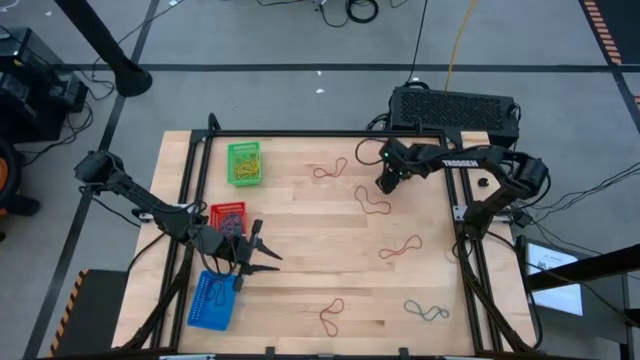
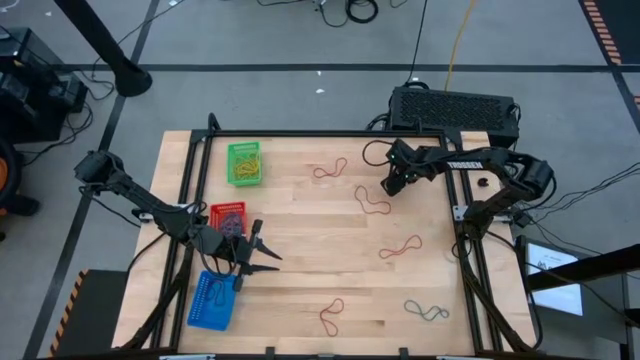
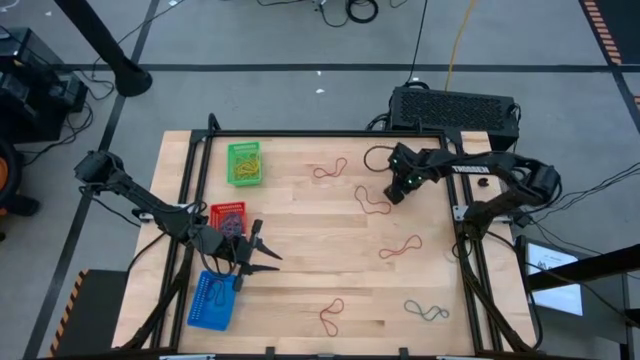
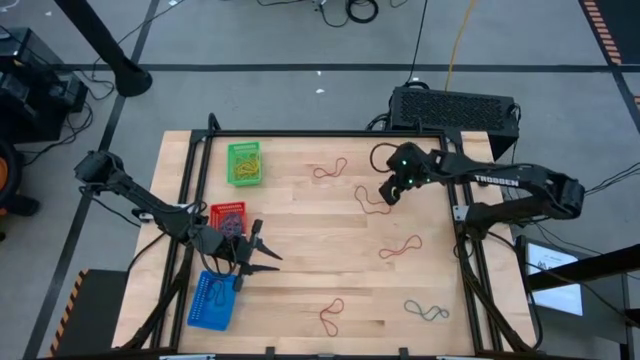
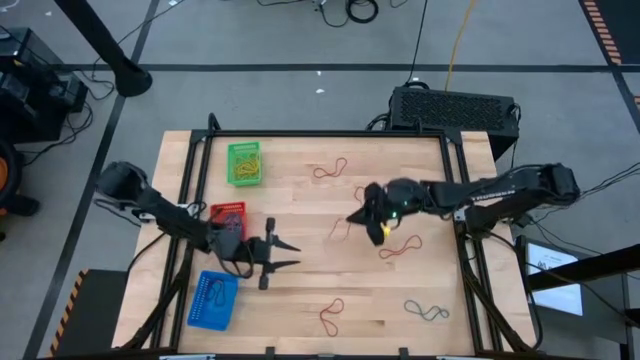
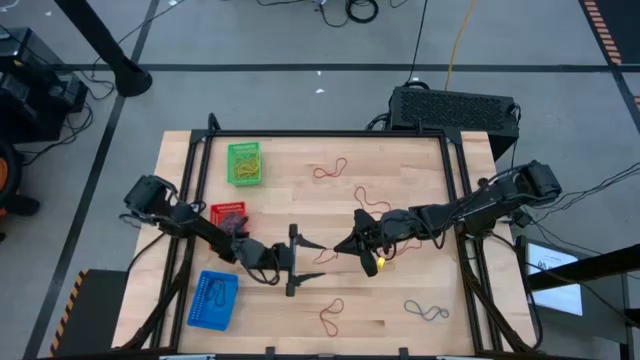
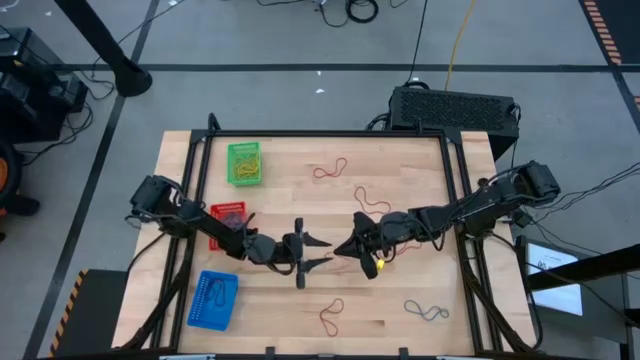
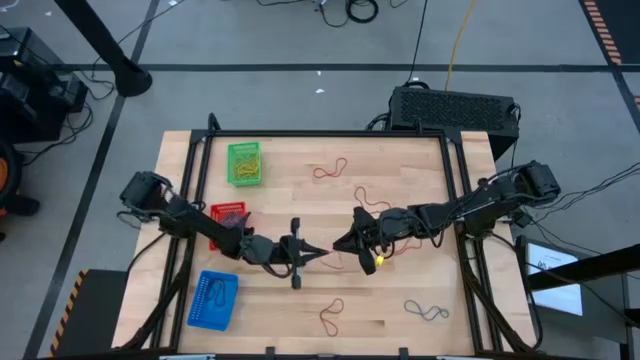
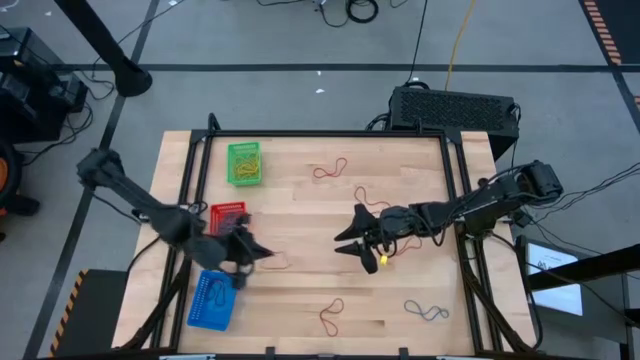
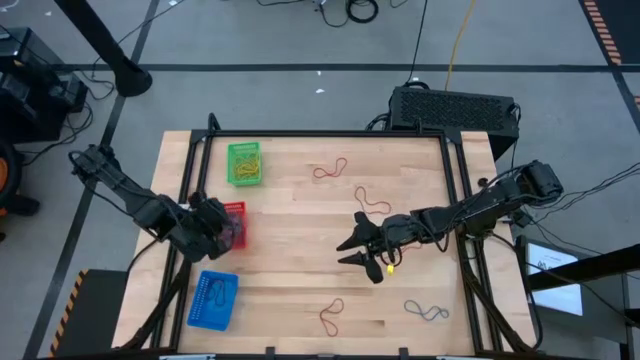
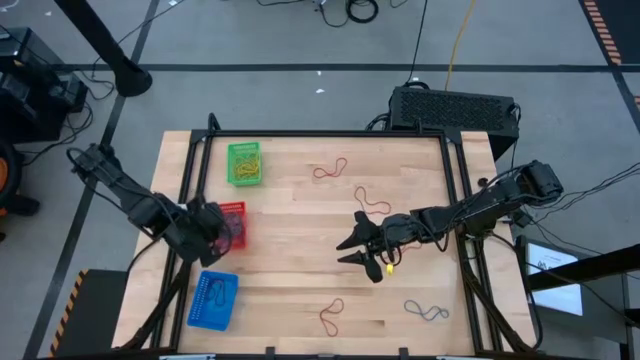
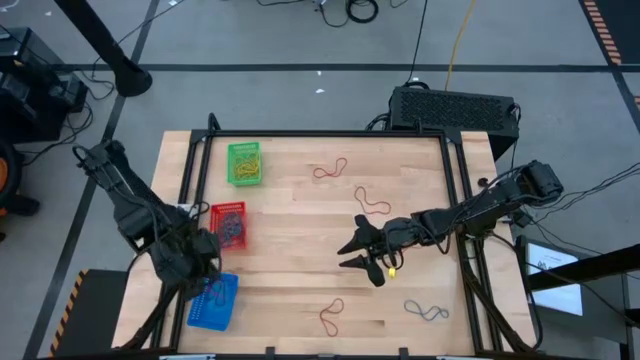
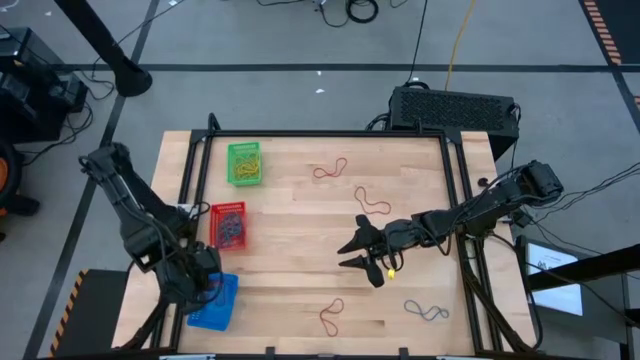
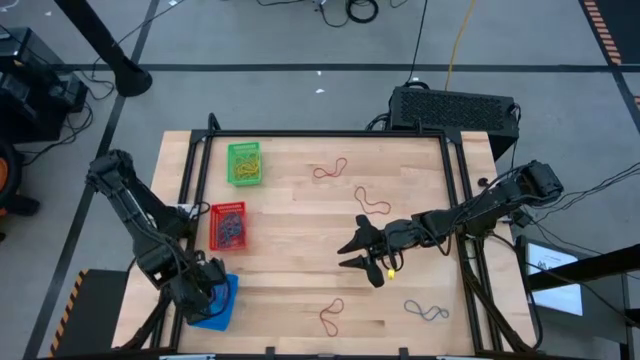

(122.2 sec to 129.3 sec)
Task: Sort rubber bands into baskets
Put the red rubber band into the blue bin

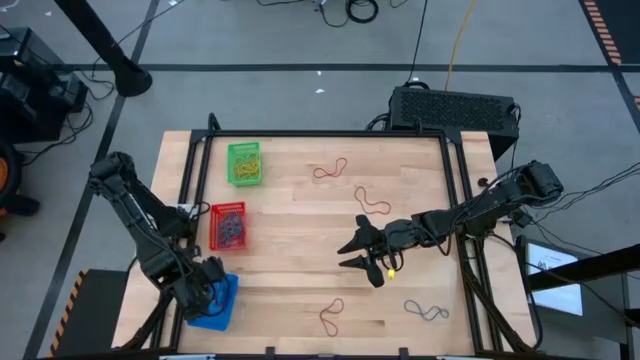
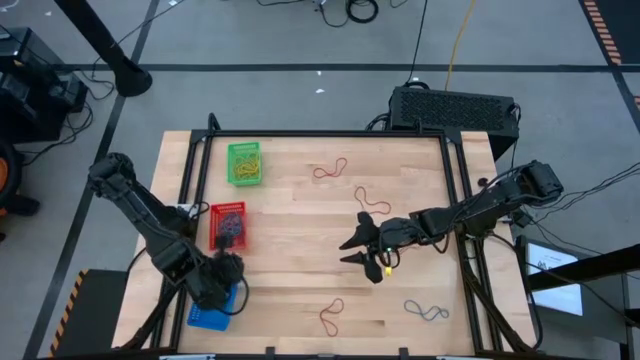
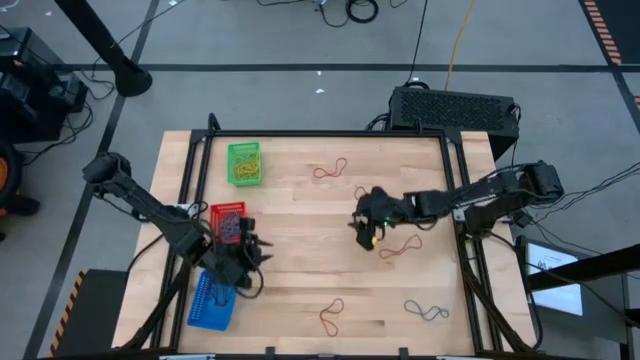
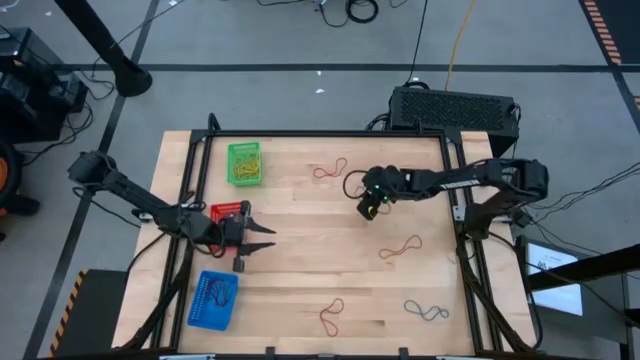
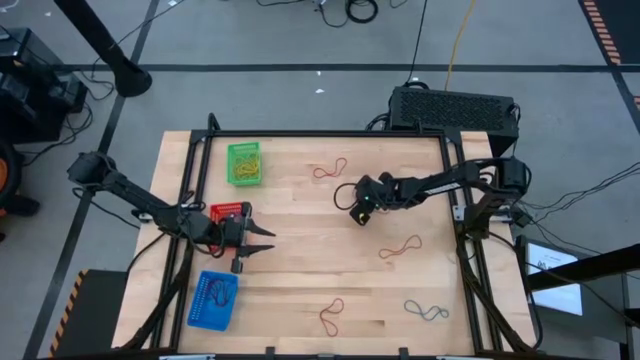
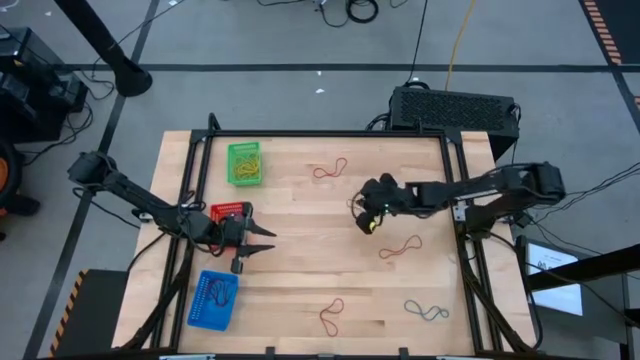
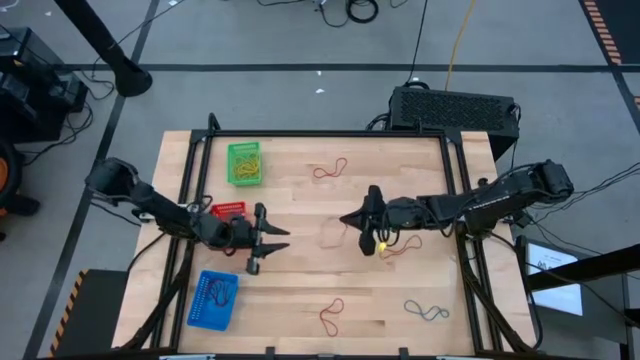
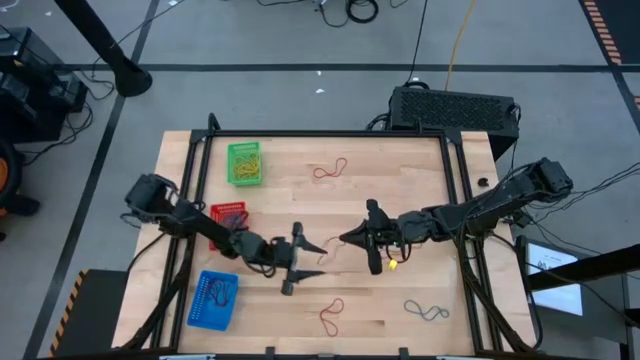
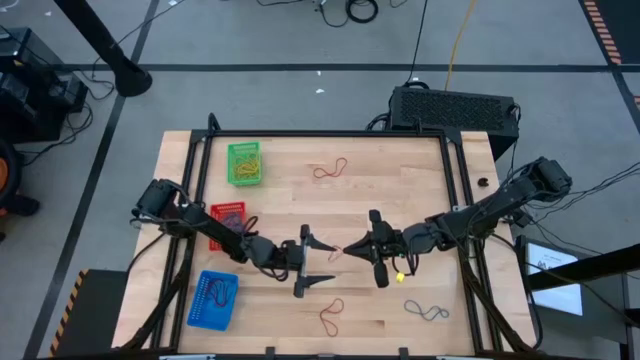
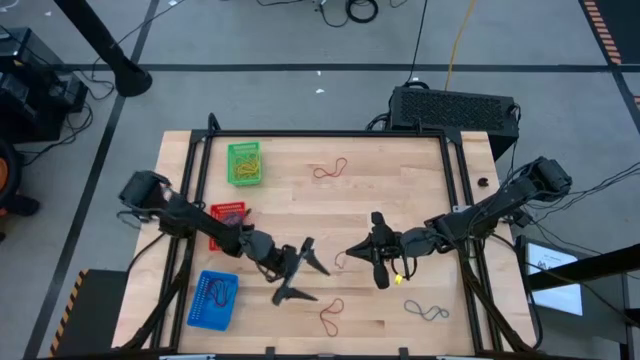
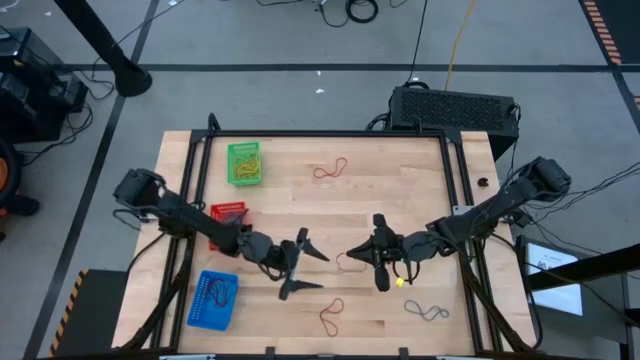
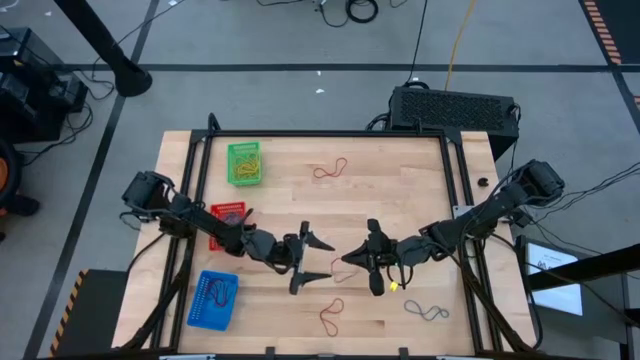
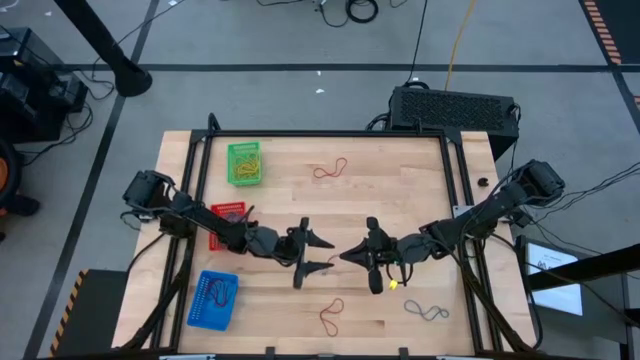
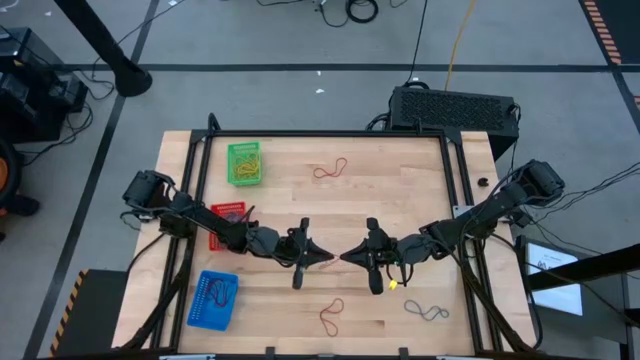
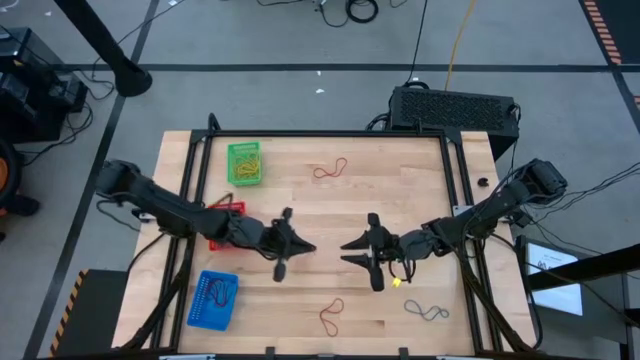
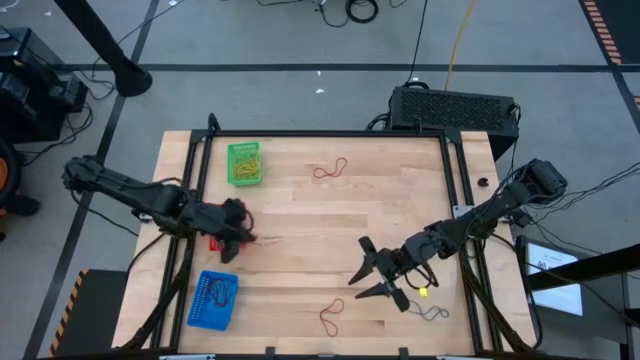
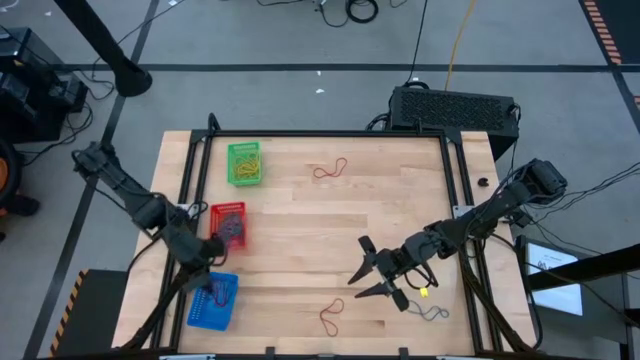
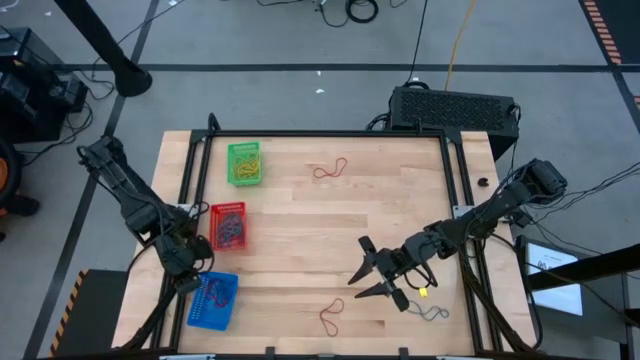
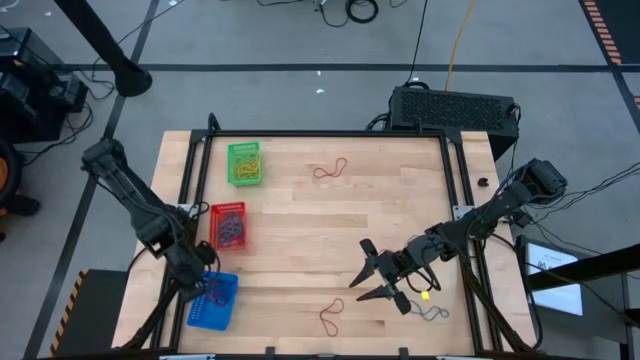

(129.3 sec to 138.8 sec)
Put the red rubber band into the blue bin

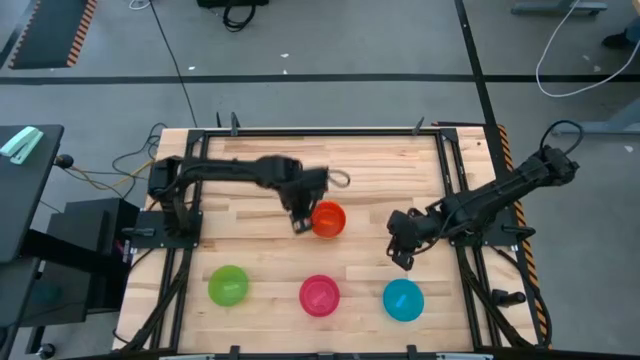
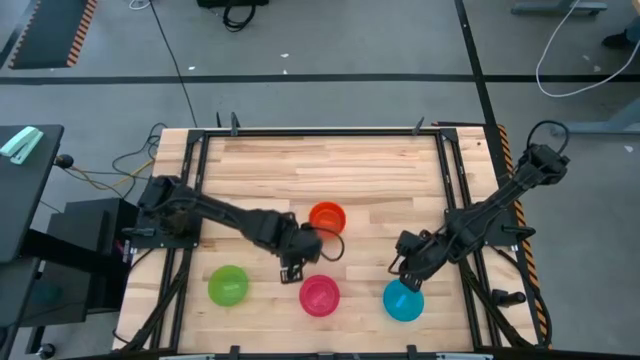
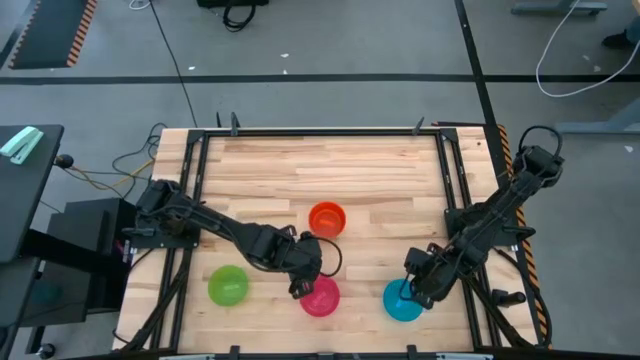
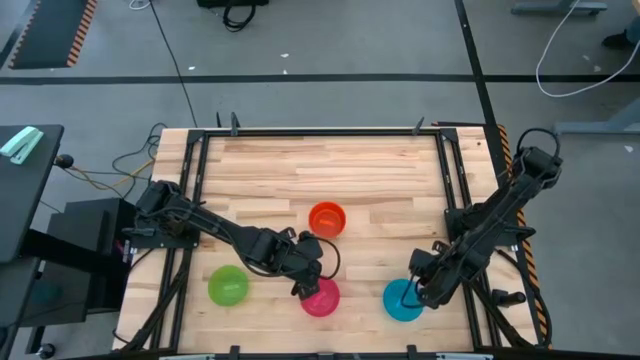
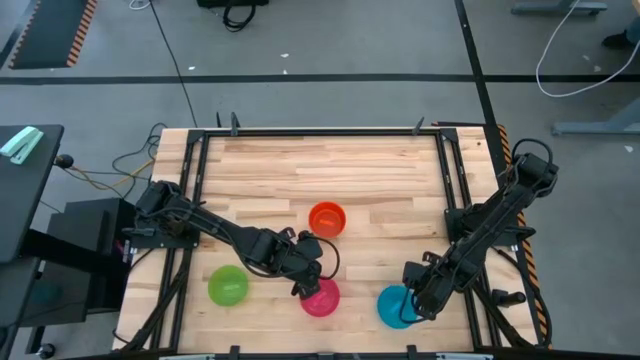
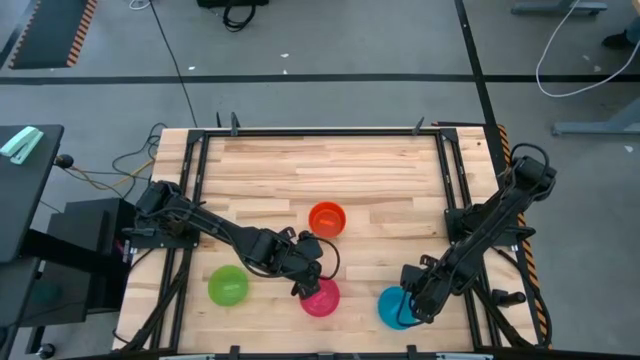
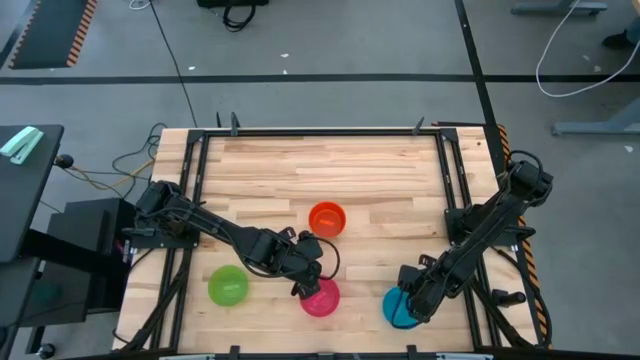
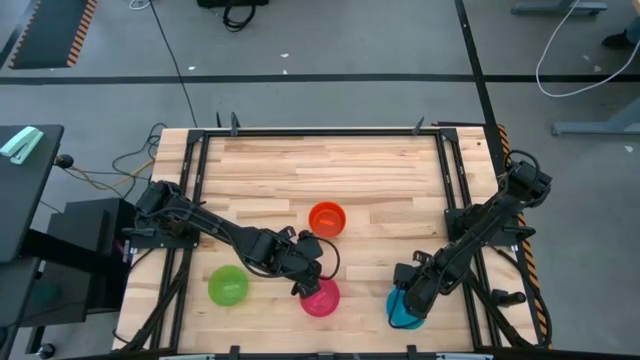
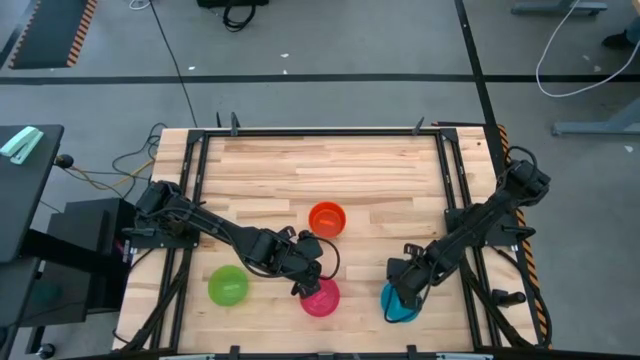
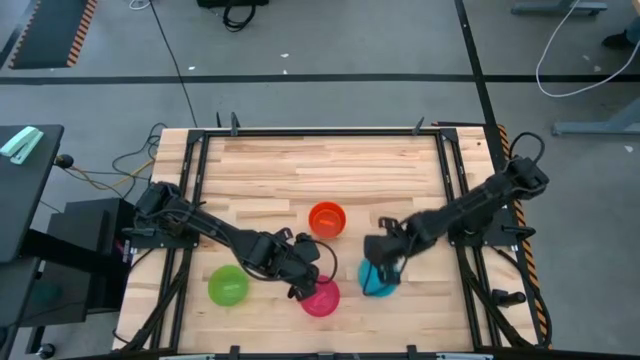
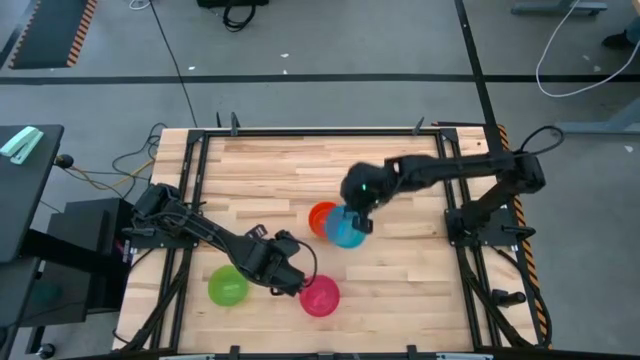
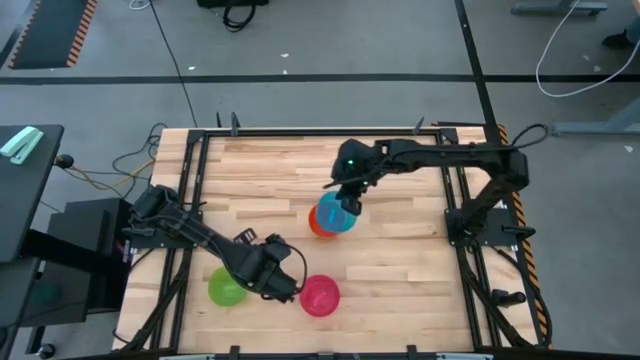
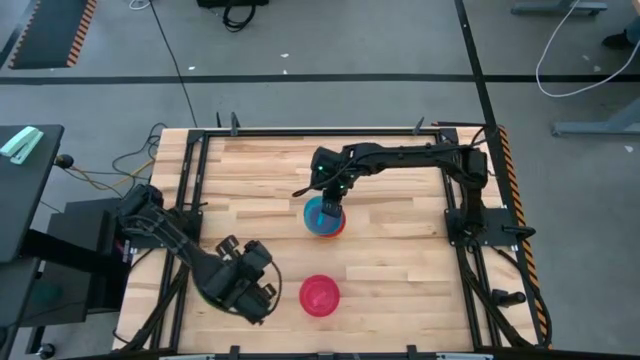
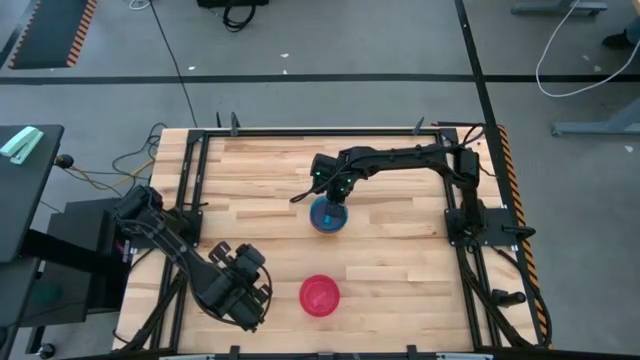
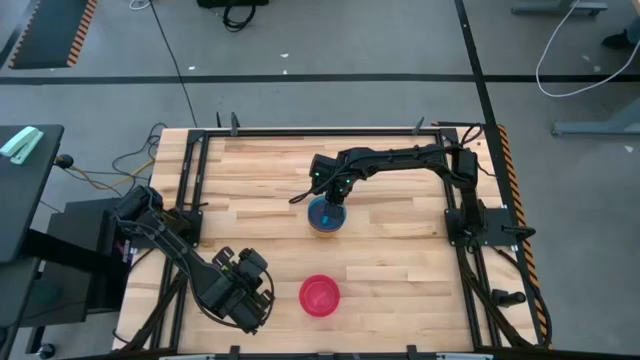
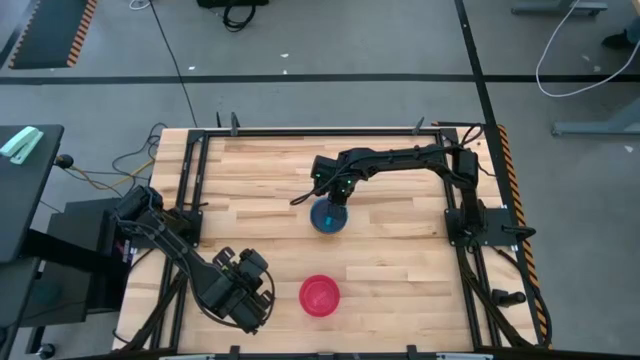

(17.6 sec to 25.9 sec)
Task: Nest bowls inside each other
Stack the blue bowl onto the orange bowl
